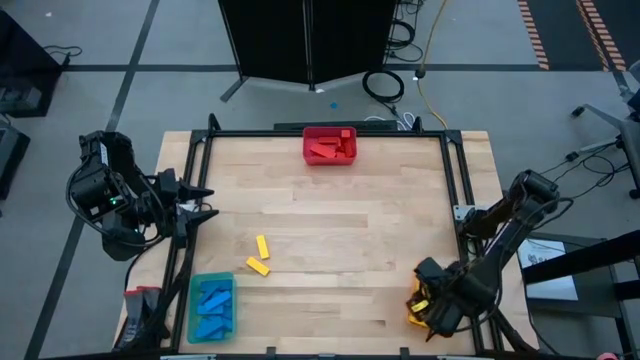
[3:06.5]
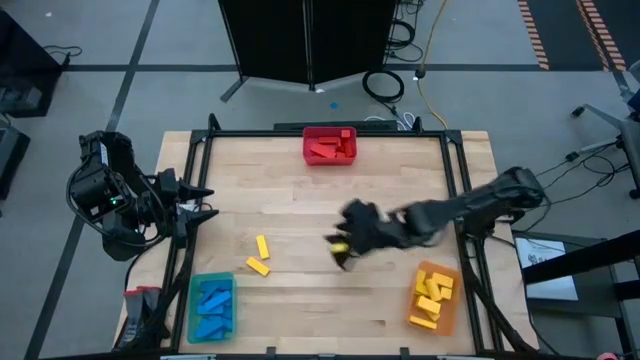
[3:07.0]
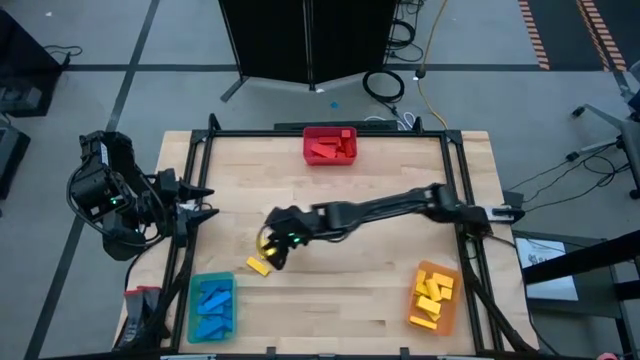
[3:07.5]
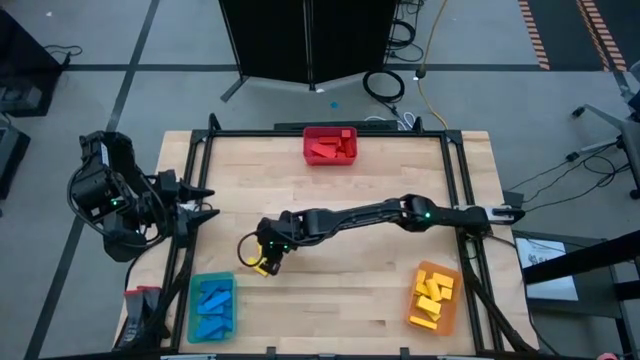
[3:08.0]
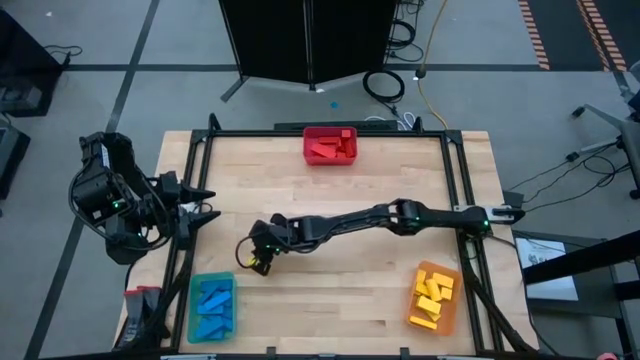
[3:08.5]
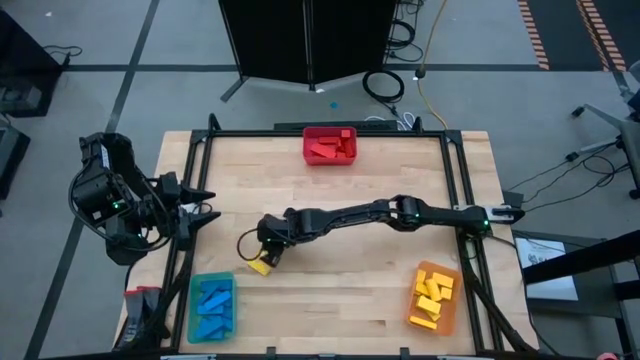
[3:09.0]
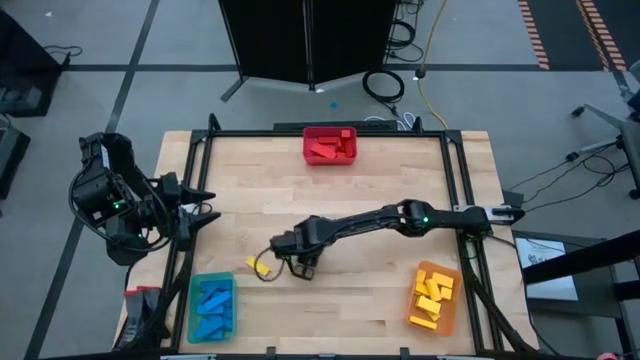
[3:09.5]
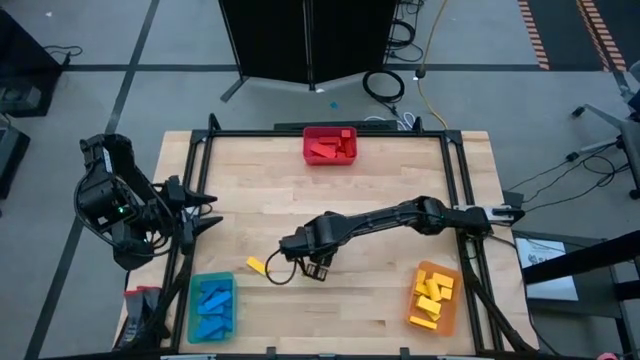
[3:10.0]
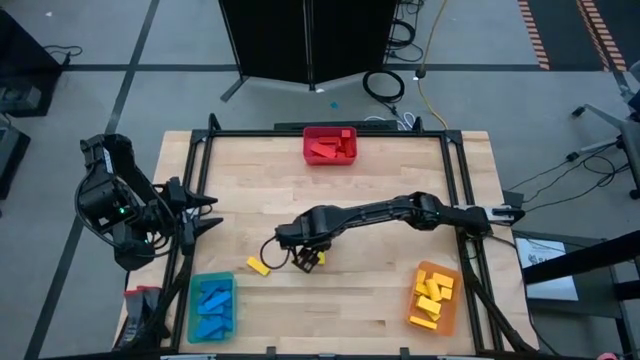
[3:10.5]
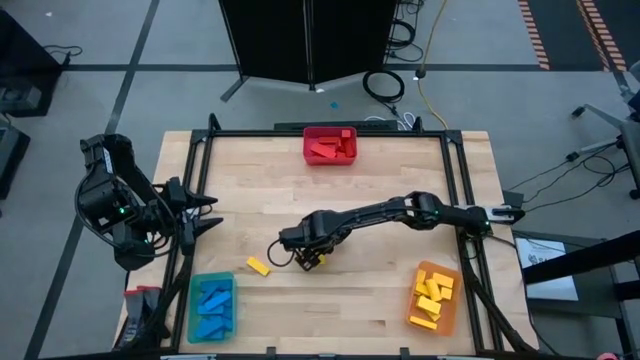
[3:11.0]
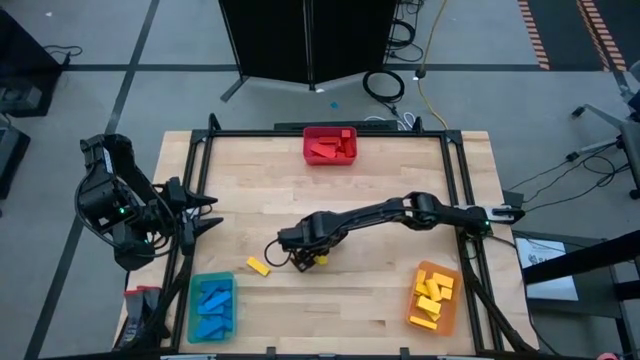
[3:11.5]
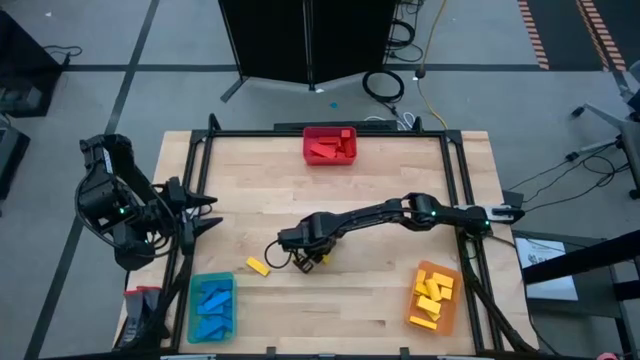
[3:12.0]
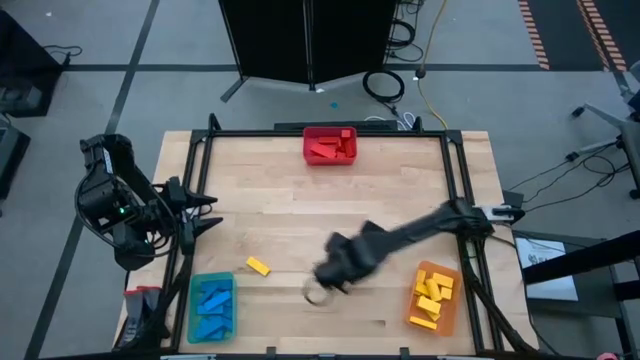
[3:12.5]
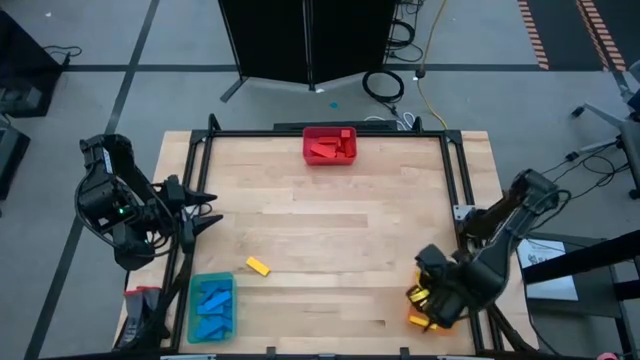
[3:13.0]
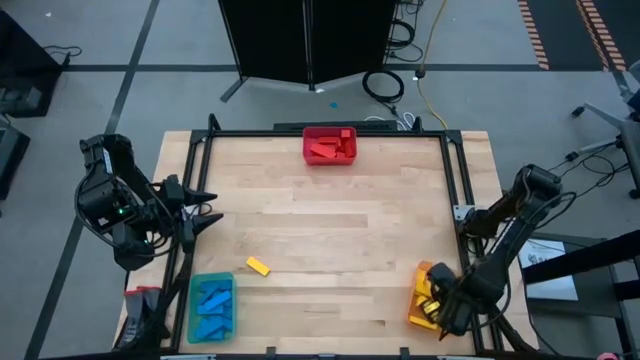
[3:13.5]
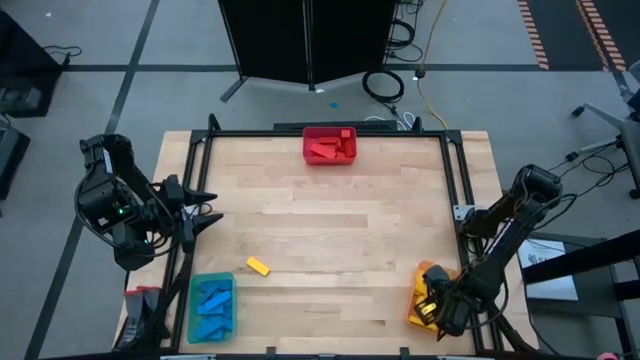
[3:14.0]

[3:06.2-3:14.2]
Task: Sort blocks
Put the yellow block into the orange bin

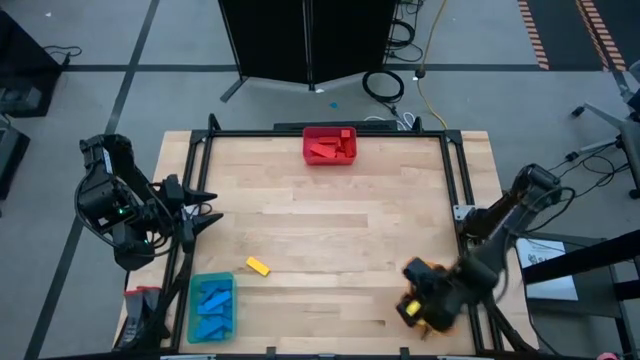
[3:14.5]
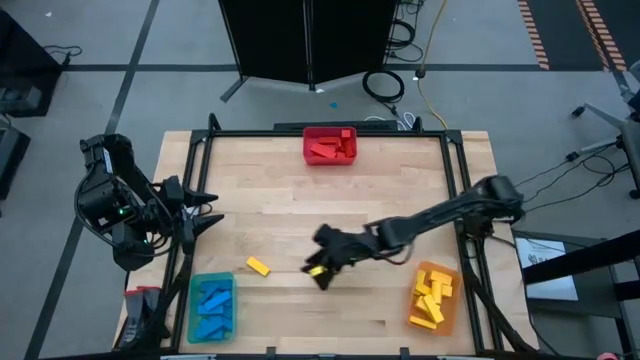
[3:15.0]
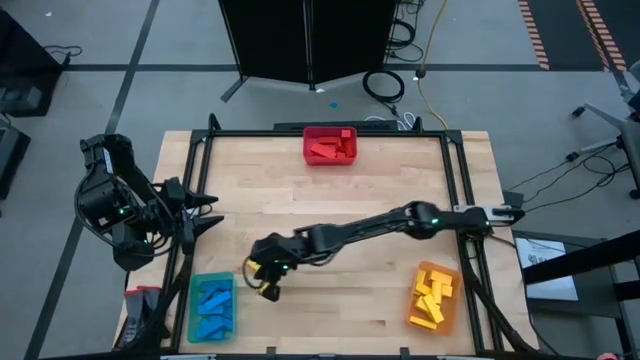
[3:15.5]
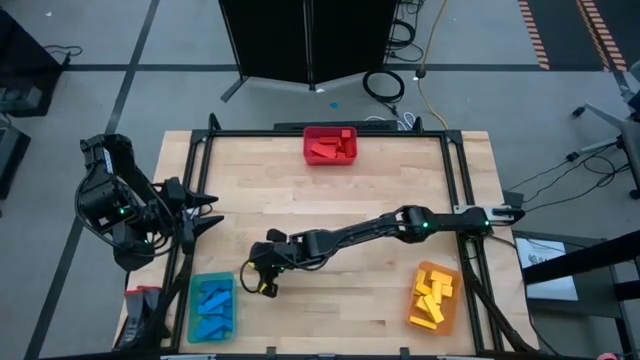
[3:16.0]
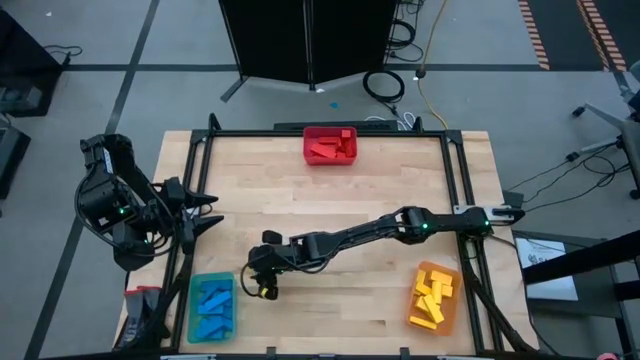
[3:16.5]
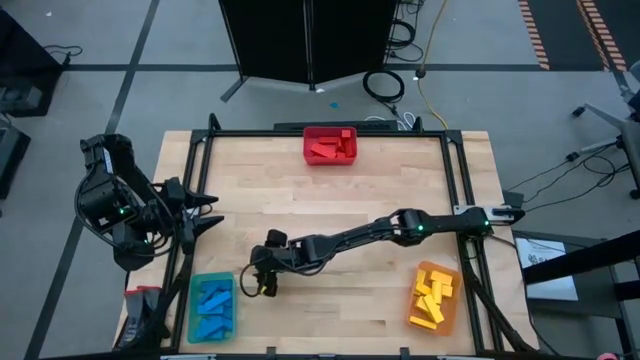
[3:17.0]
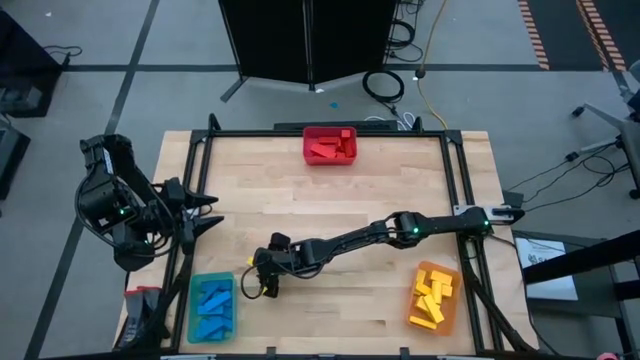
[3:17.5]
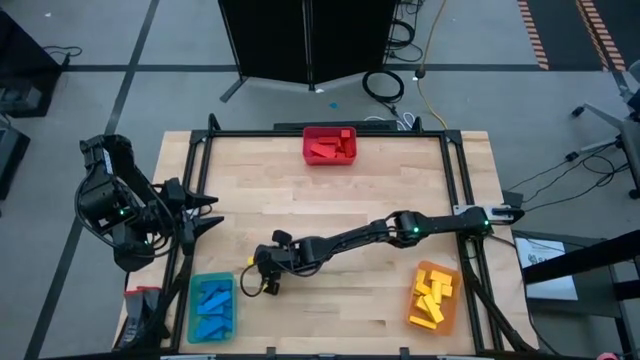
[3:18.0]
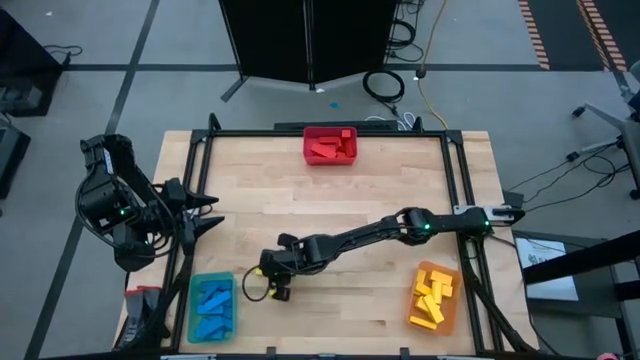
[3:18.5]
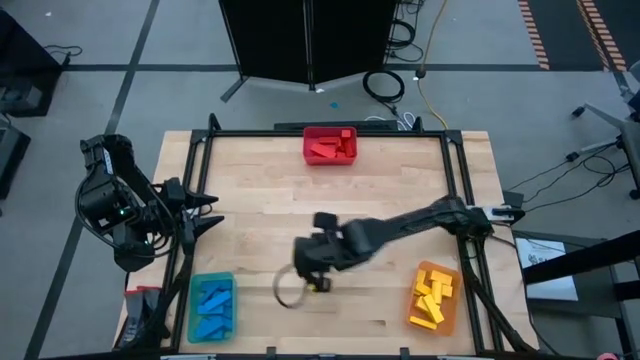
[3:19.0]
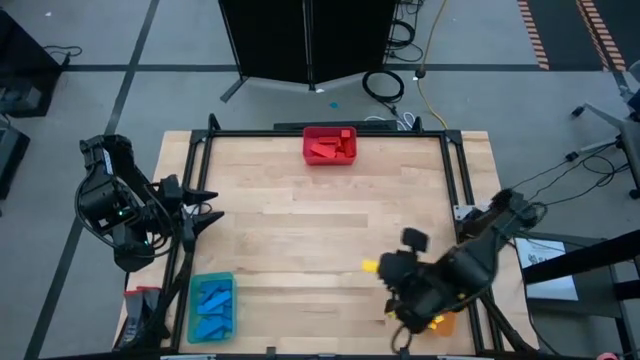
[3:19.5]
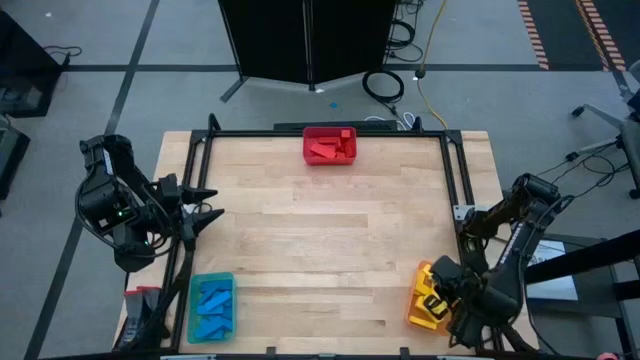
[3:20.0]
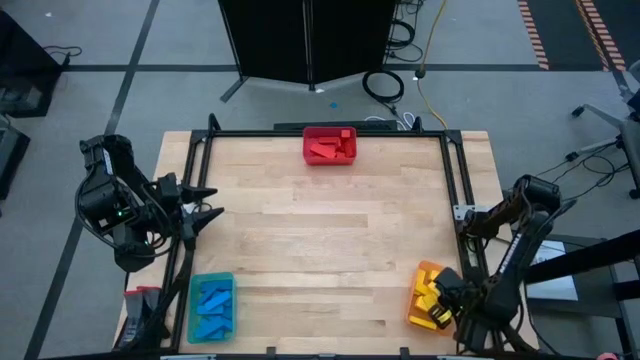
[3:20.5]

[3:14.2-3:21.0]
Put the yellow block into the orange bin
